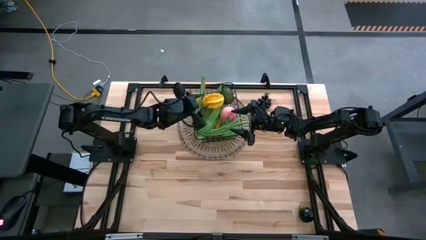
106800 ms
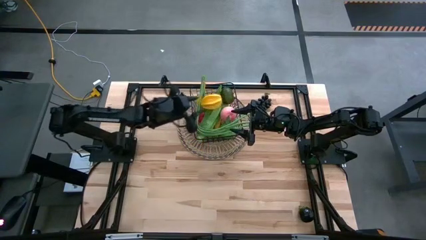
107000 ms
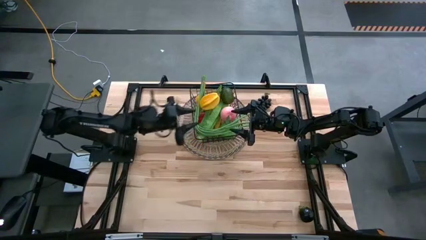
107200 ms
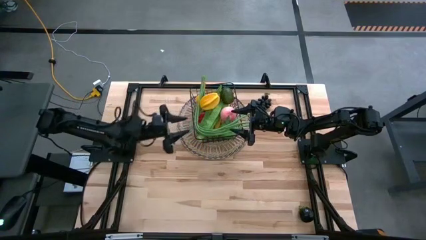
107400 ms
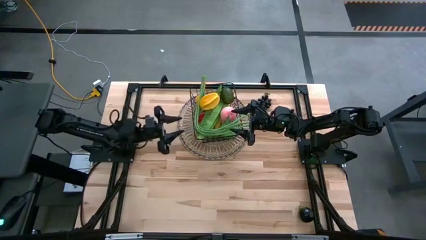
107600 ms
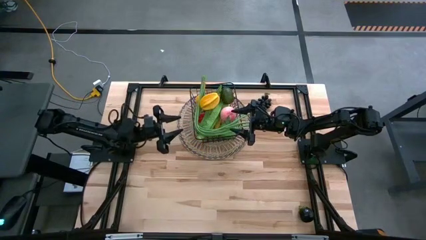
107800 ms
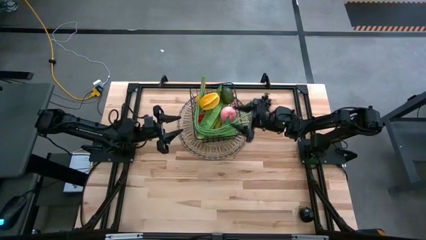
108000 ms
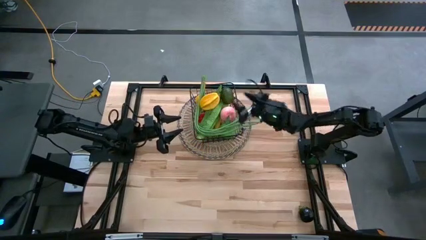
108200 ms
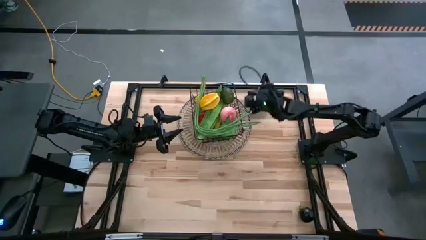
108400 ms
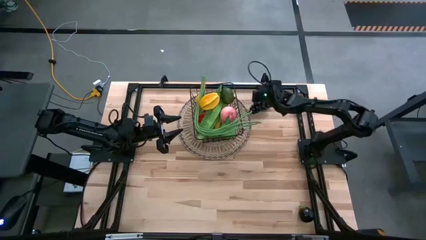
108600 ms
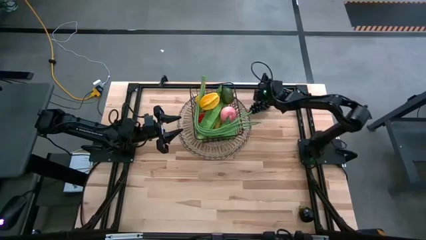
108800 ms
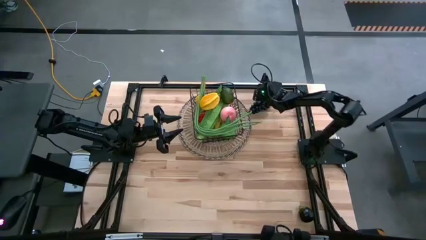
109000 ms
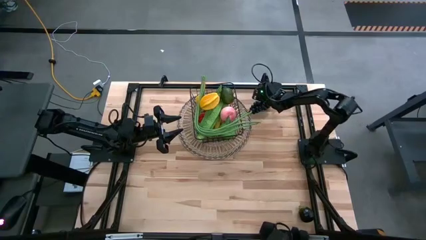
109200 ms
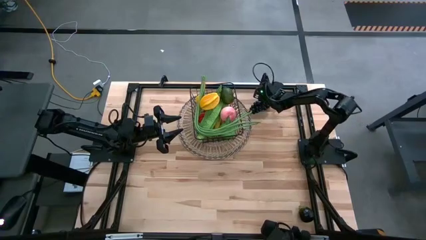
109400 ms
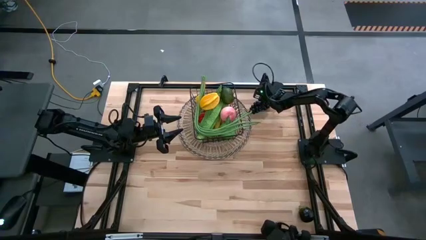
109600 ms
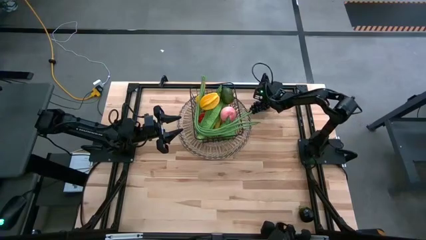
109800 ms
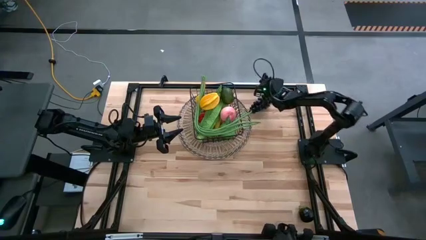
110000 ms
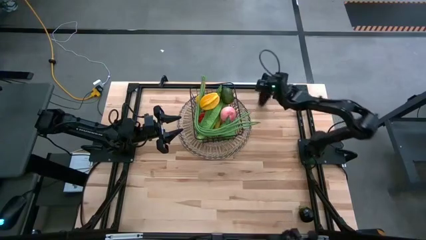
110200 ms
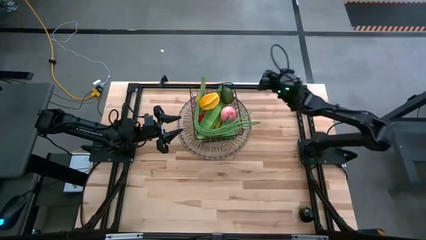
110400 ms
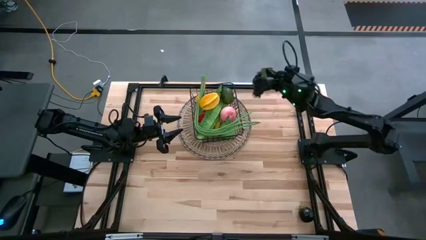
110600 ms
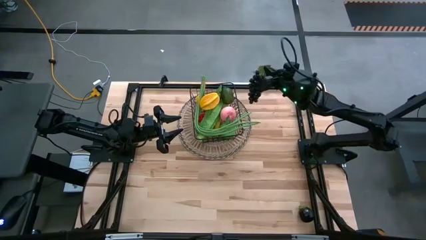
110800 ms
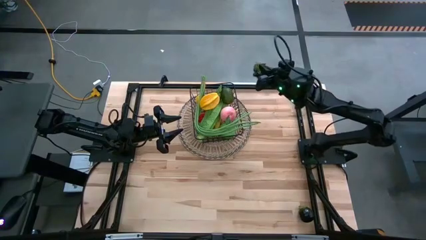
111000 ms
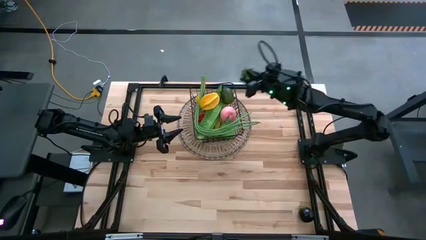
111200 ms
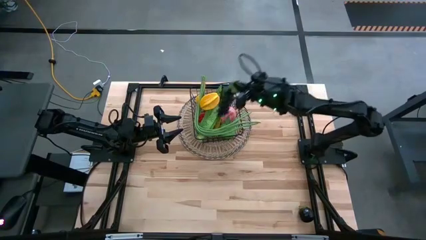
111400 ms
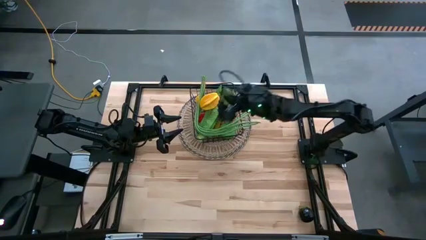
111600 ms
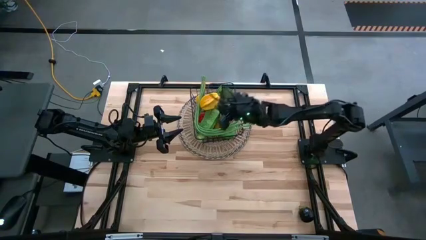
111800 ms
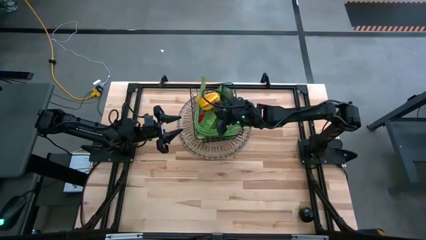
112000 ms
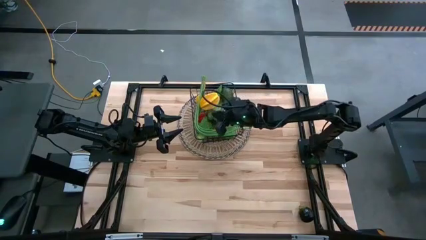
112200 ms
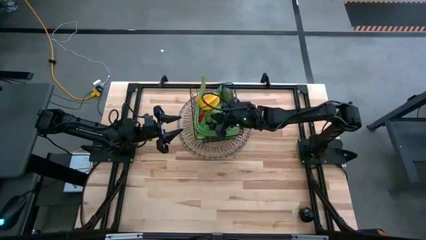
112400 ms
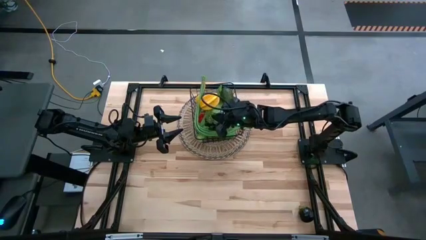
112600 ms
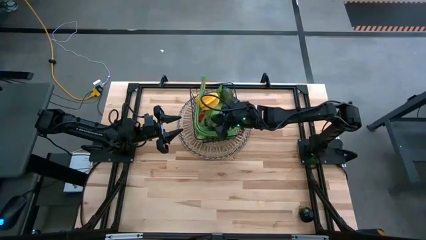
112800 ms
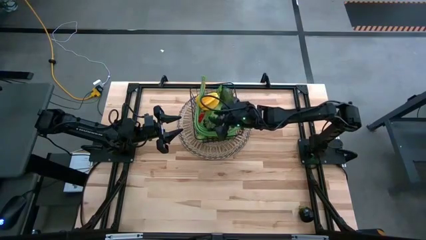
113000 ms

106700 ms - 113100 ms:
Task: Build produce basket
Put the black grapes into the black mesh basket

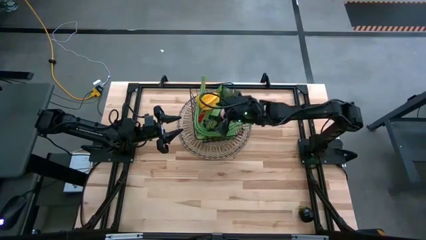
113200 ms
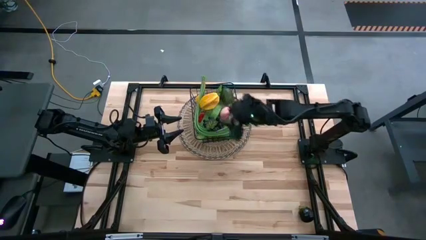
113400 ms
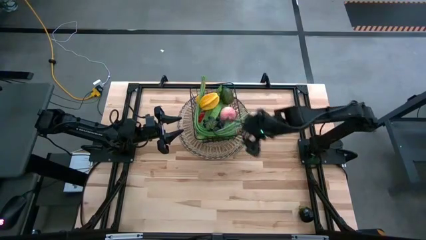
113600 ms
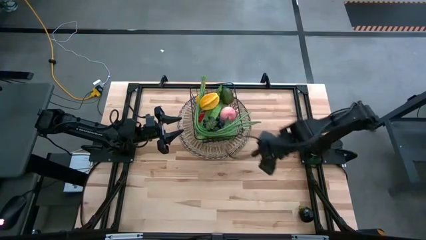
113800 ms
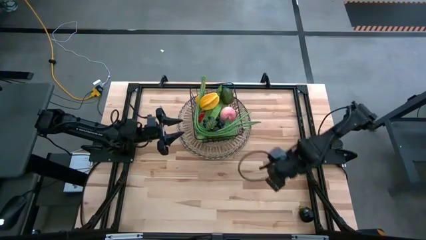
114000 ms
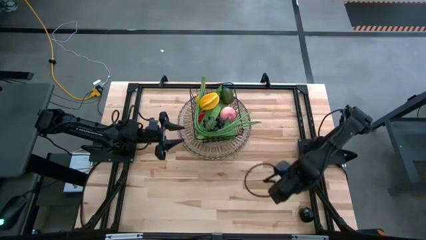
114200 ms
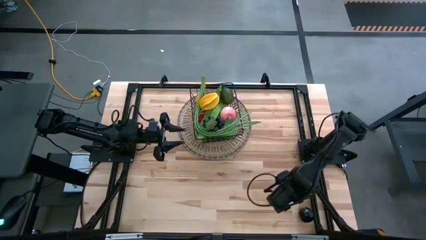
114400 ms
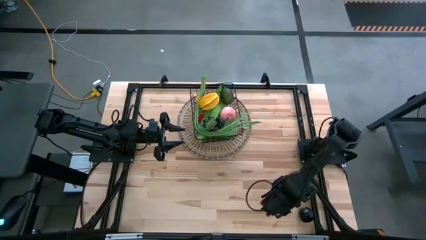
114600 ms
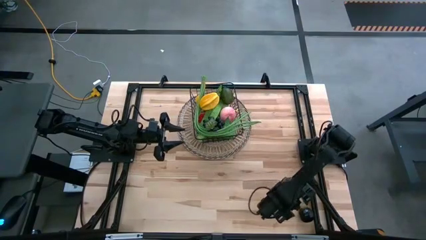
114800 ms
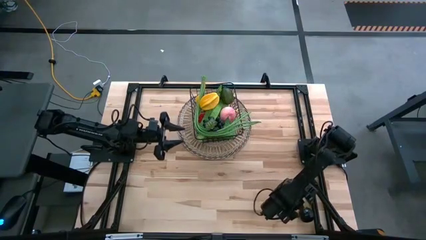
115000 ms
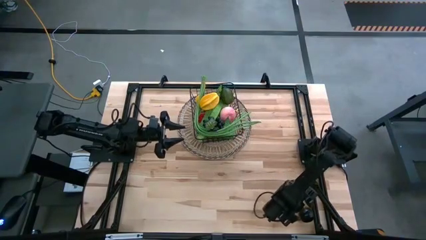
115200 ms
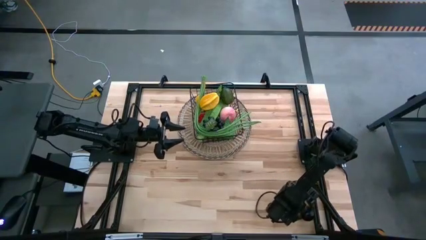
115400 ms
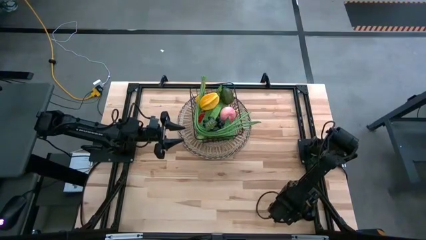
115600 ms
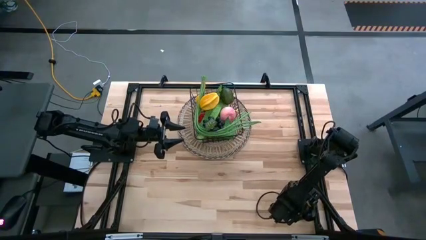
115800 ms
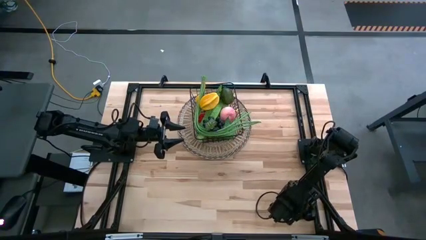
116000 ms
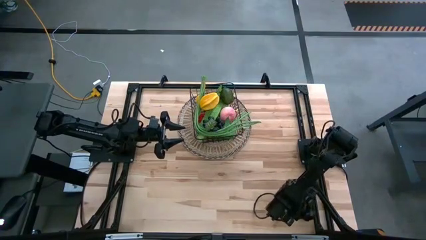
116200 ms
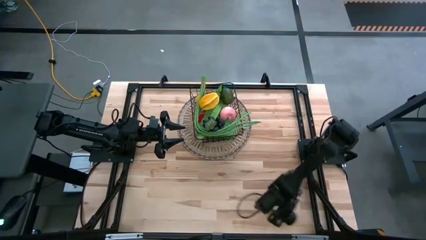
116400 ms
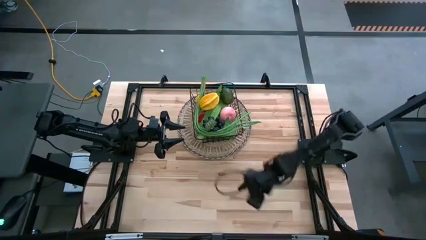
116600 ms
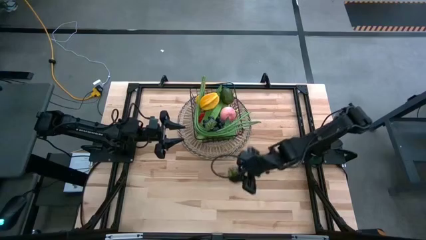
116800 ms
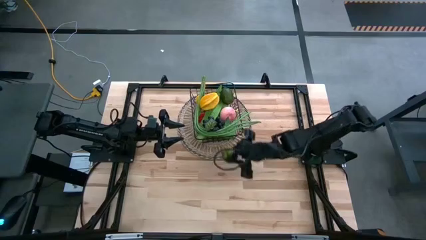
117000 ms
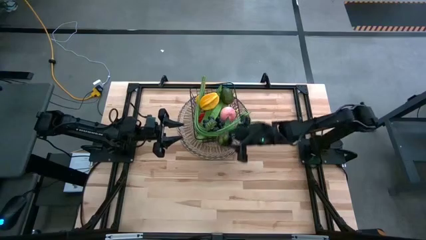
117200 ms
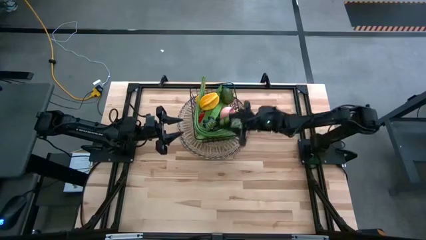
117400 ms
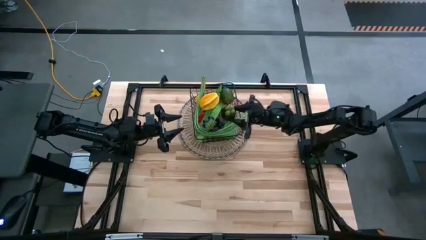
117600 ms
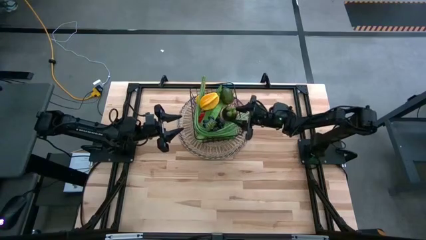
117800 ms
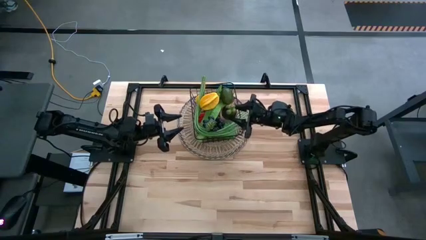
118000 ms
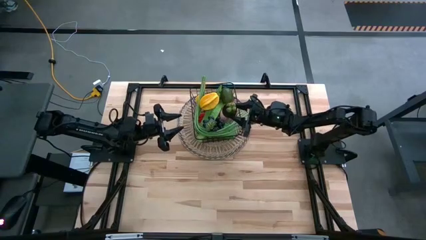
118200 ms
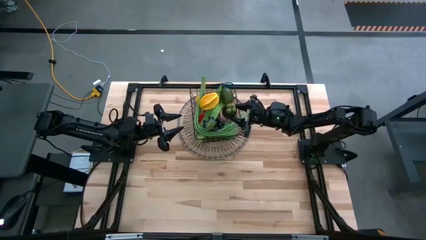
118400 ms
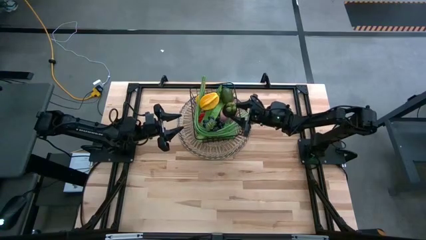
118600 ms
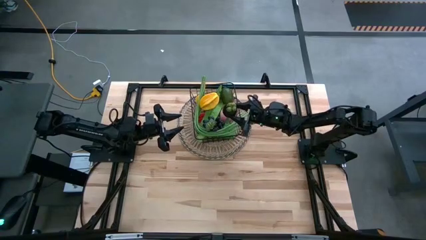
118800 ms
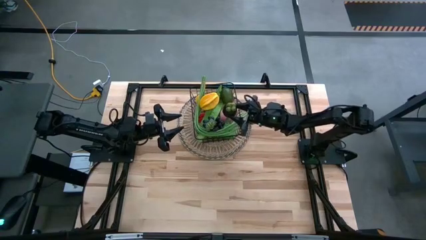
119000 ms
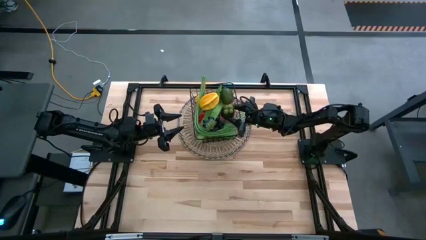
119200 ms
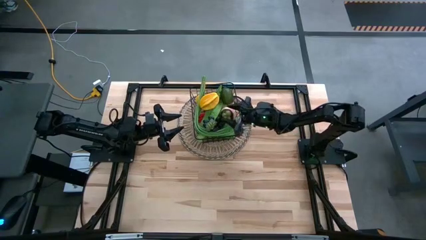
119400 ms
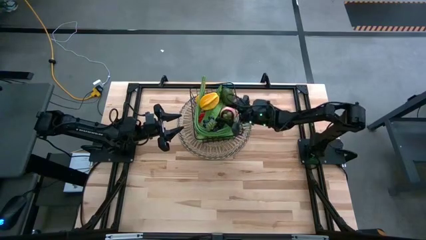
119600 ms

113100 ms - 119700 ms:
Put the violet mangosteen into the black mesh basket
